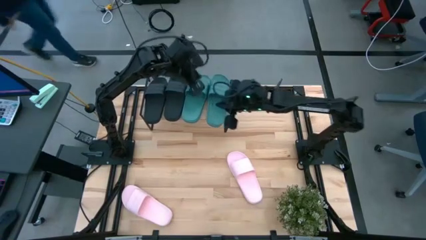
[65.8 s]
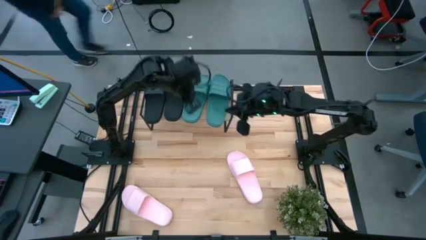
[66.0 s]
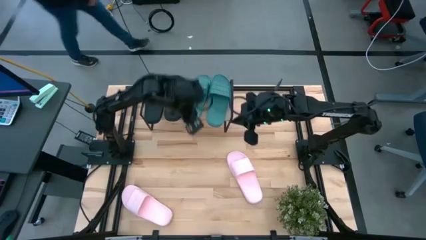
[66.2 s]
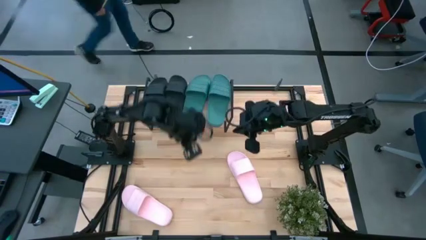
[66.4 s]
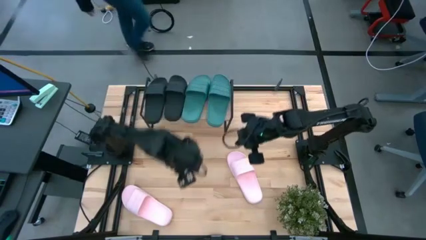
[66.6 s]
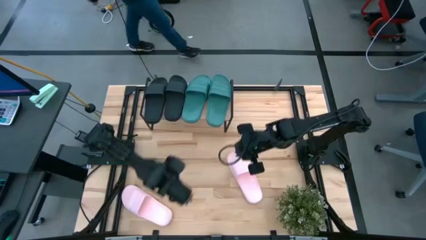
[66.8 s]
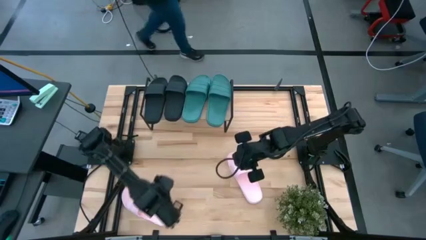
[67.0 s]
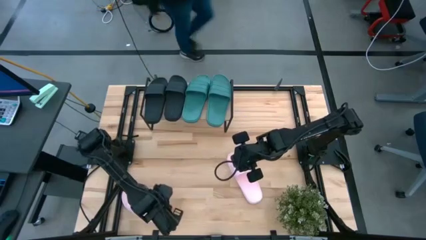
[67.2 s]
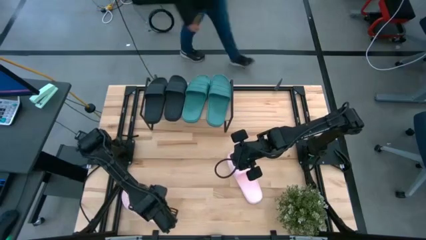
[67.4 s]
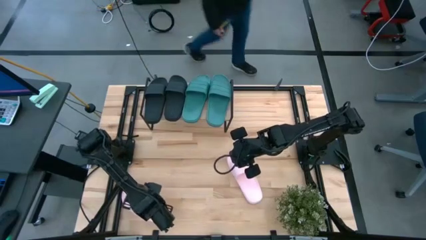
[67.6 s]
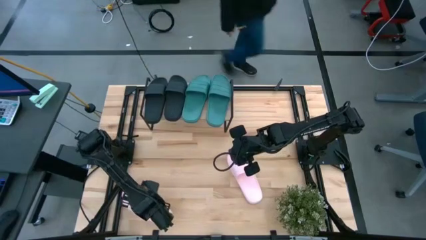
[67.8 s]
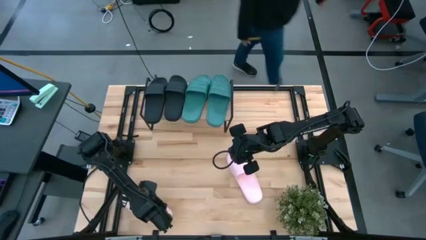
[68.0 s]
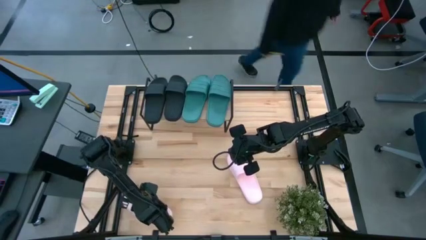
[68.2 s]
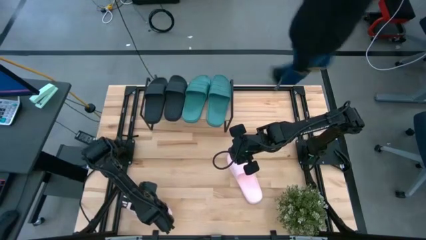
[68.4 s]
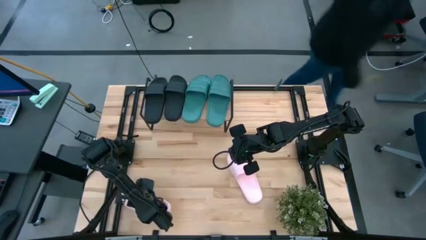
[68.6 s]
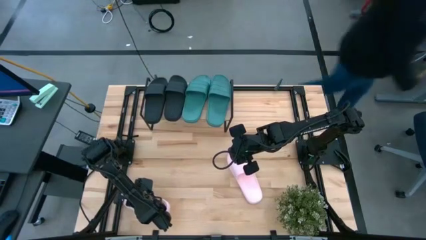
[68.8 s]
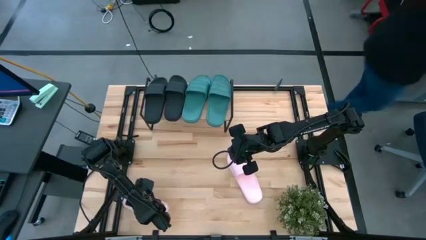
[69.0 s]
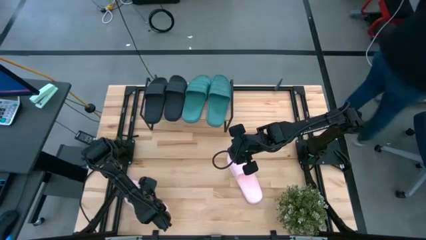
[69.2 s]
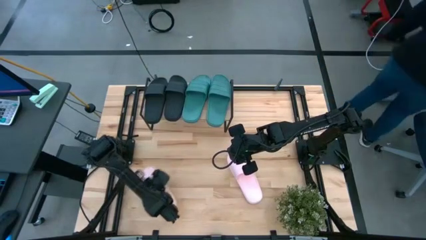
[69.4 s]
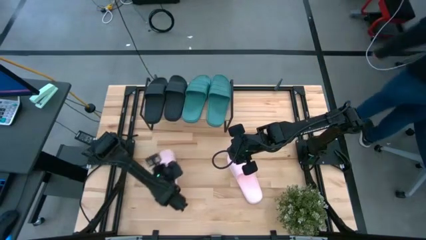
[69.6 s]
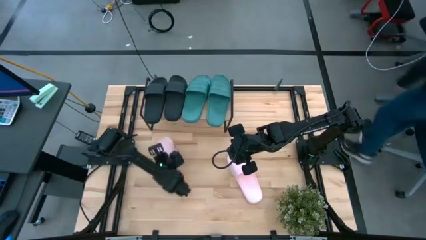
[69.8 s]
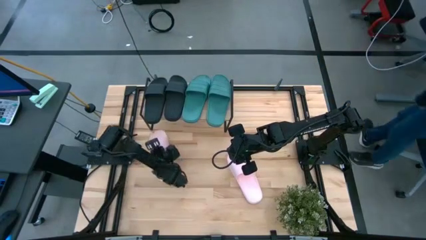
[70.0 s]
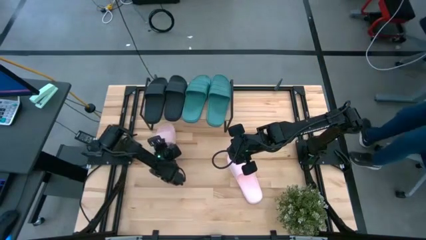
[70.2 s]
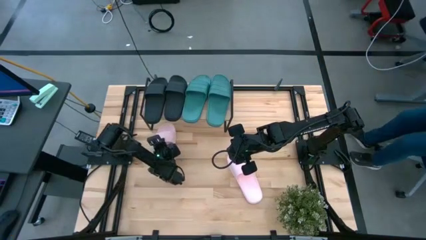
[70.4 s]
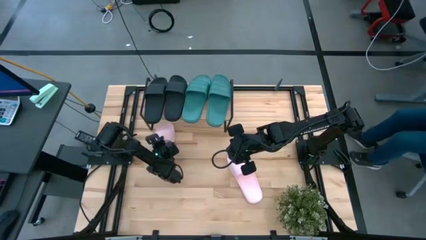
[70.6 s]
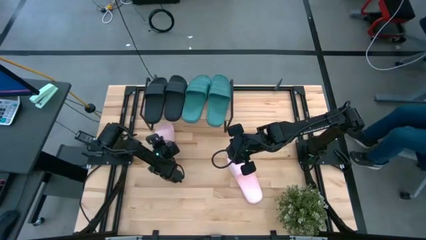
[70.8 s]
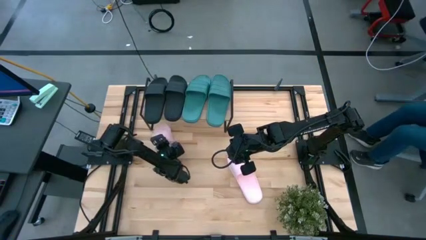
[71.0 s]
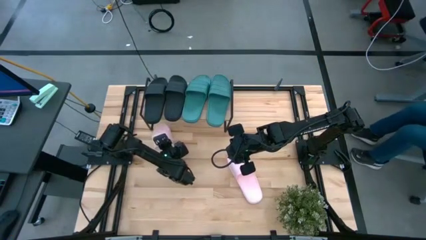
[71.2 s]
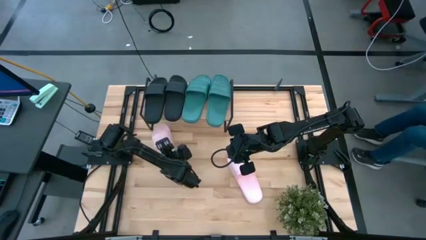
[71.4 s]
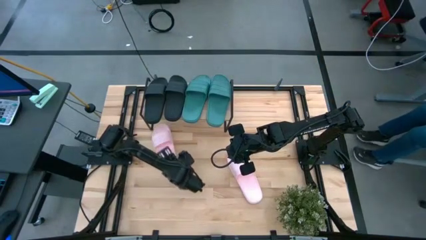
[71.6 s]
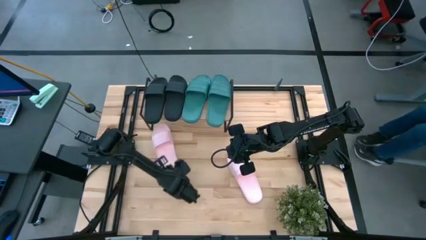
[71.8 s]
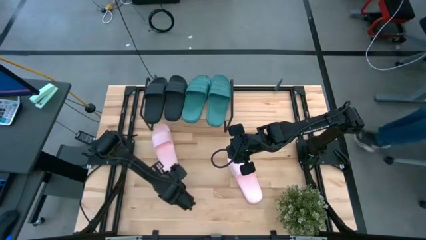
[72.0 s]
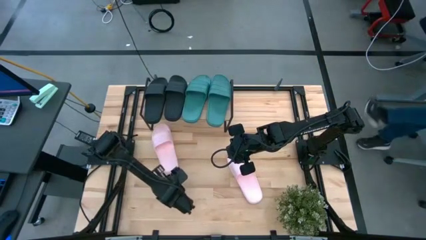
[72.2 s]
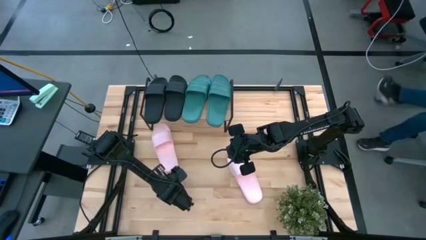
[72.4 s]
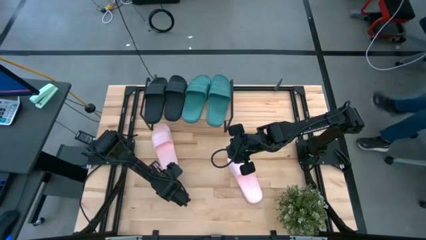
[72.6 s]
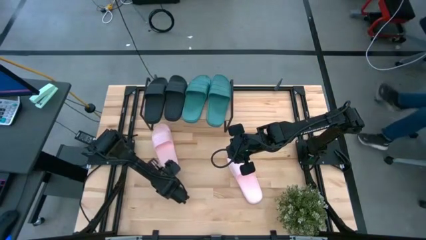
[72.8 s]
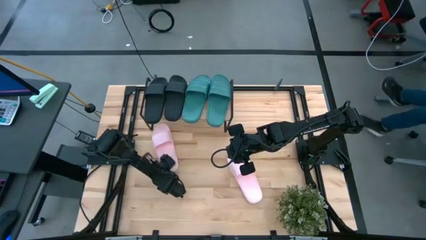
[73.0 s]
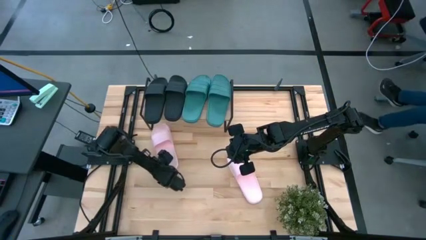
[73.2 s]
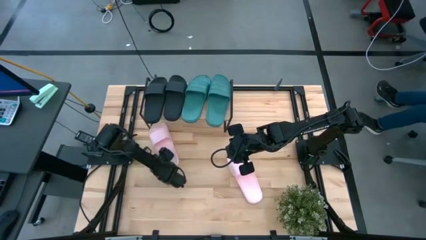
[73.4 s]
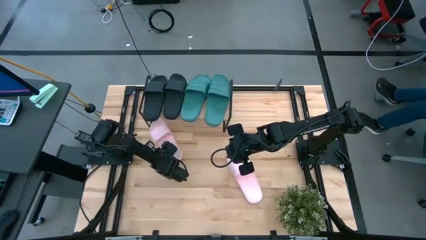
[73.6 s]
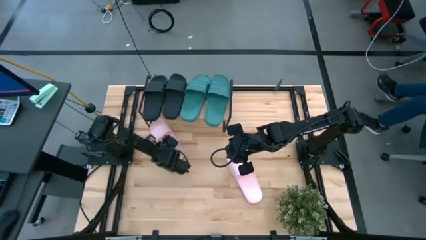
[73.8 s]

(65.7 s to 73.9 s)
Task: Pick and place slides into the shelf
Move the left pink slipper under the shelf

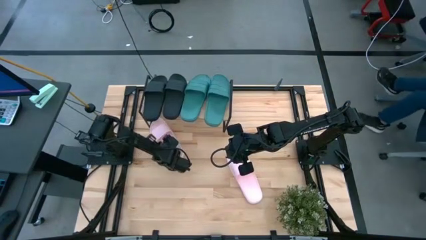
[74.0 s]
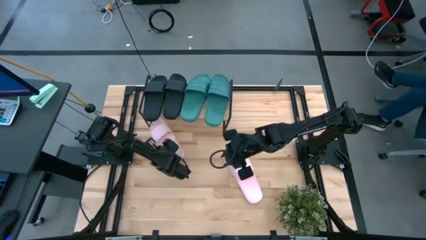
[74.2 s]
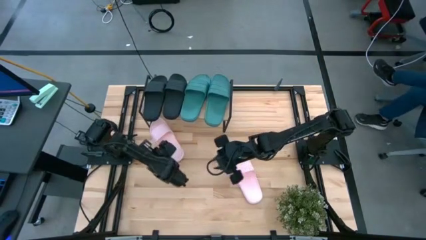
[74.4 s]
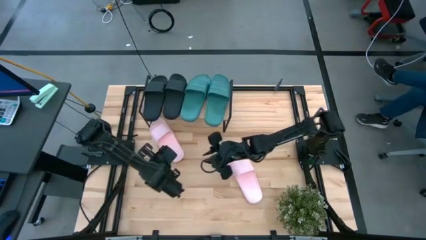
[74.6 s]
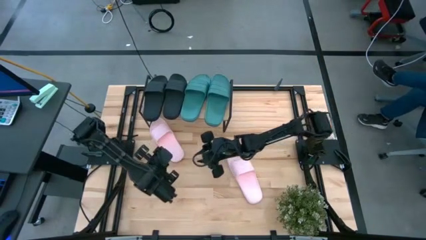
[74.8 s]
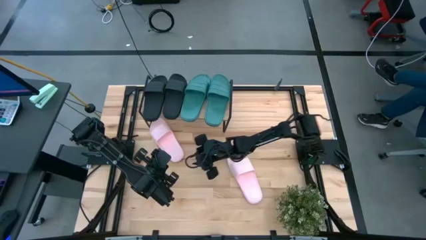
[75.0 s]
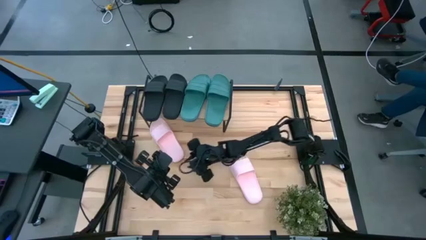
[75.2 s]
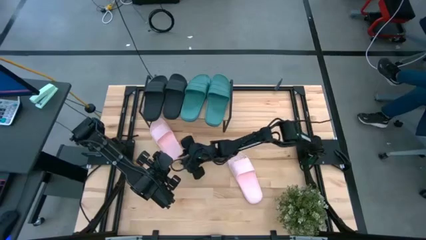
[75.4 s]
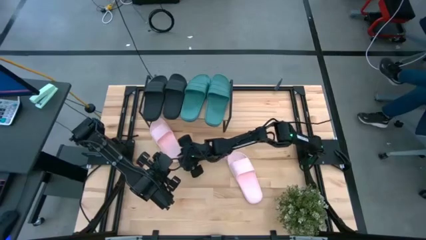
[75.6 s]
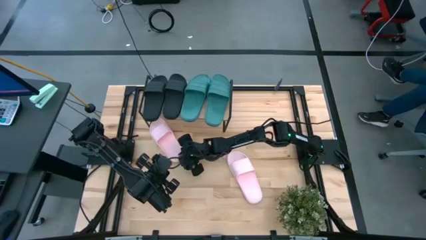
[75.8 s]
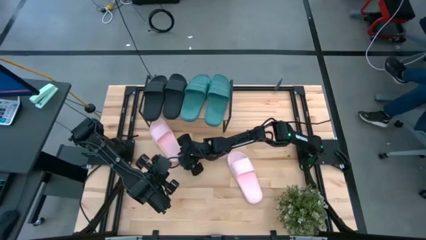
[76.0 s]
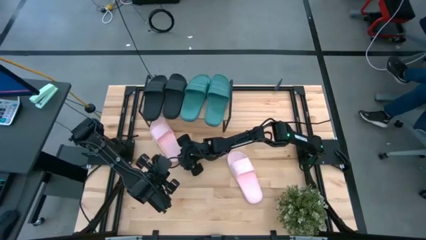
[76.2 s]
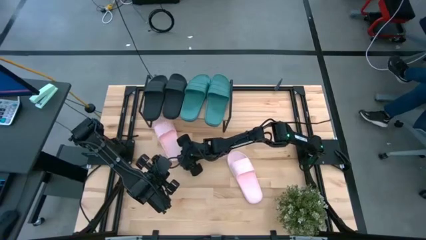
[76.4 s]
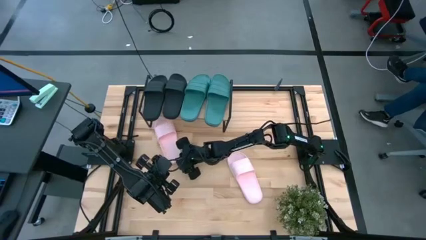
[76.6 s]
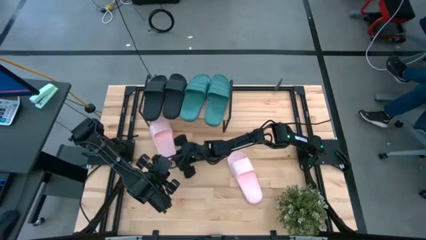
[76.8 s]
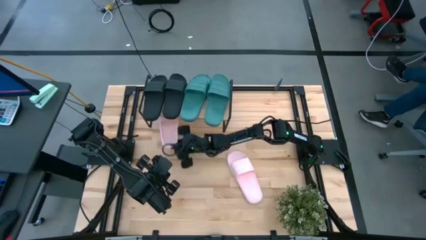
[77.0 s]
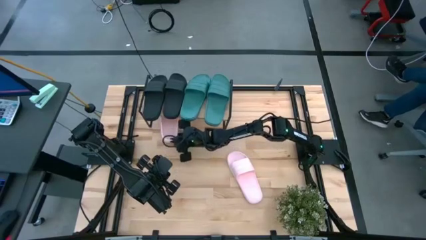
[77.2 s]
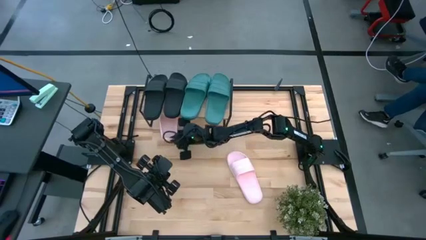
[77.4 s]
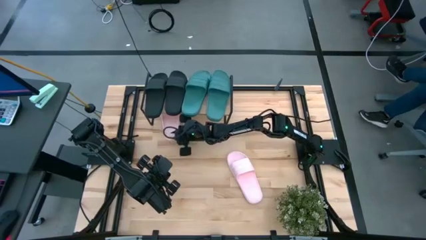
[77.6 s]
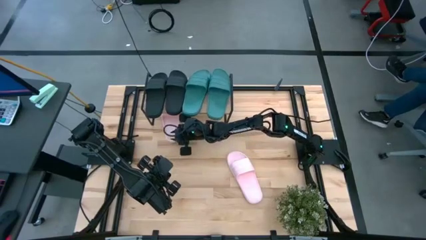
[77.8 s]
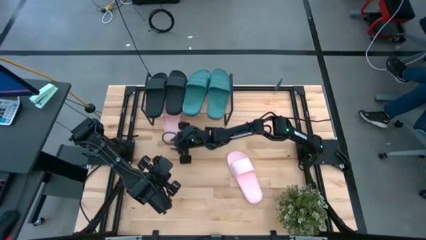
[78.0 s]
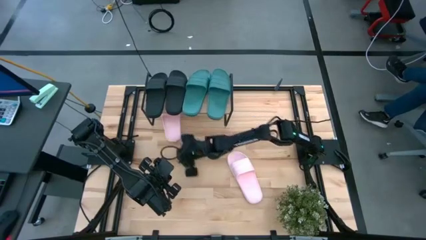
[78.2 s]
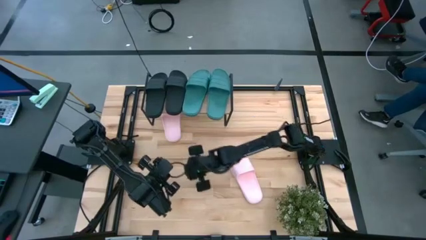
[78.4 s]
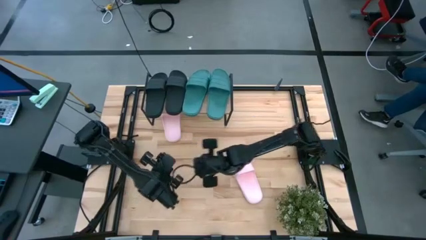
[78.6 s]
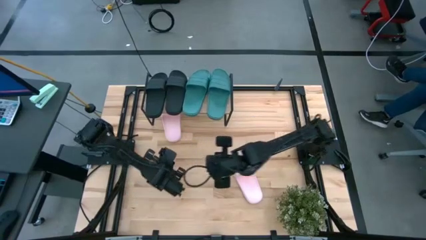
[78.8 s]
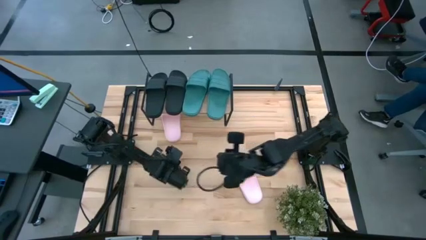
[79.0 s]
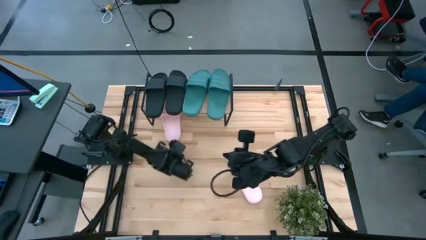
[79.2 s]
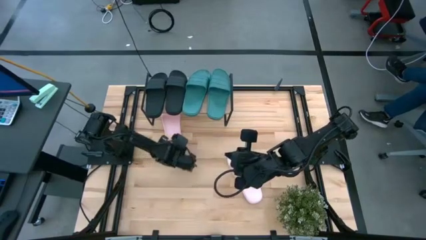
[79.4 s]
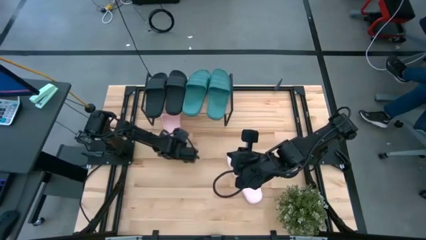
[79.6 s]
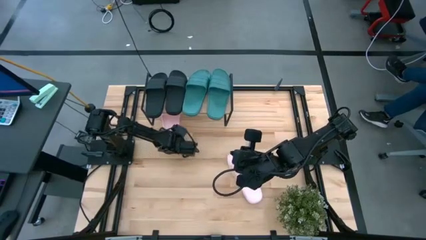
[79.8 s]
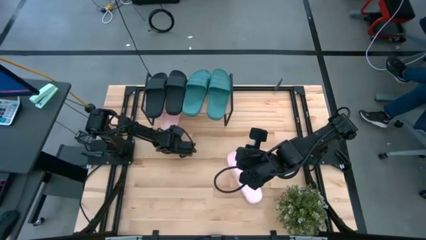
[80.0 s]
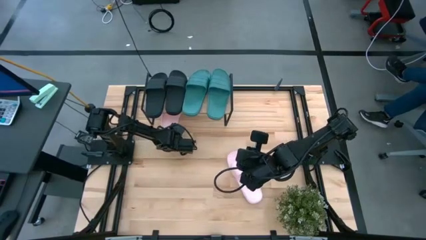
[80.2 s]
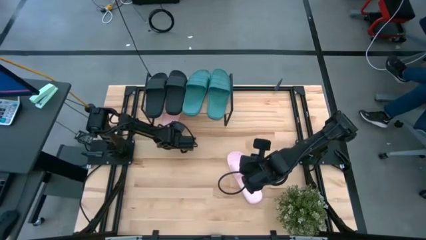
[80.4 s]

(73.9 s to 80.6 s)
Move the left pink slipper under the shelf

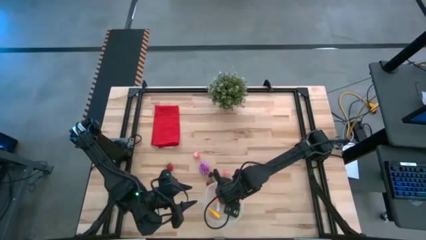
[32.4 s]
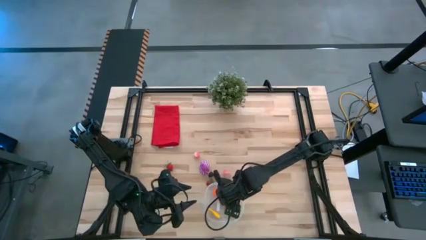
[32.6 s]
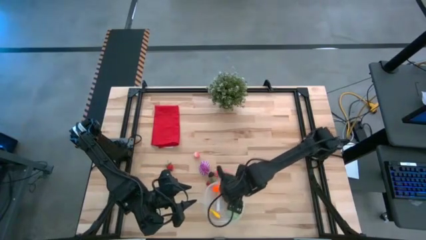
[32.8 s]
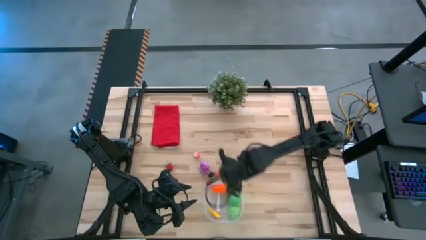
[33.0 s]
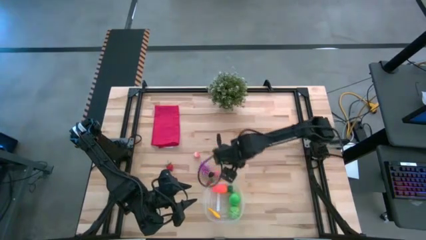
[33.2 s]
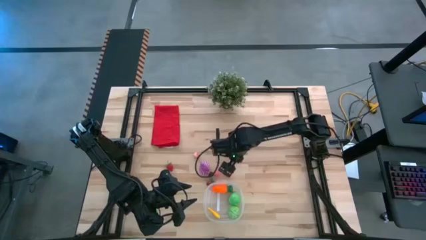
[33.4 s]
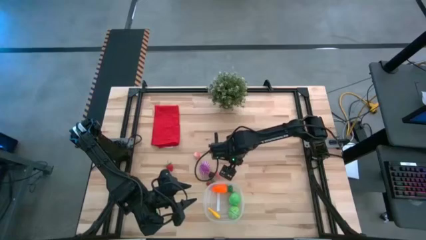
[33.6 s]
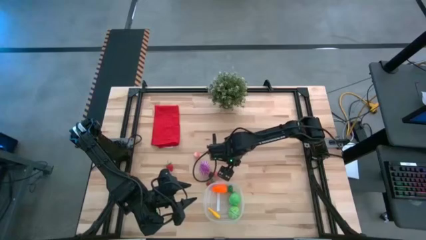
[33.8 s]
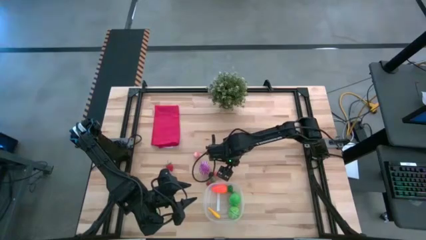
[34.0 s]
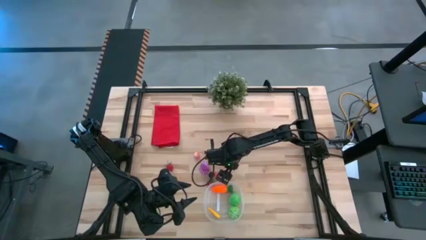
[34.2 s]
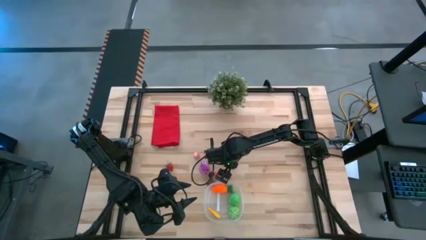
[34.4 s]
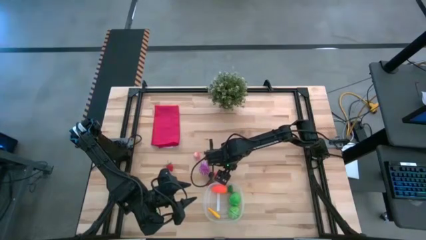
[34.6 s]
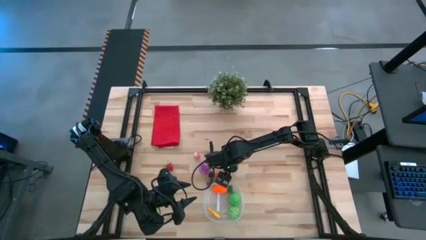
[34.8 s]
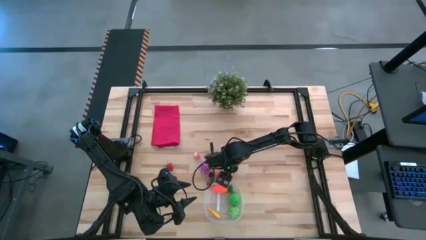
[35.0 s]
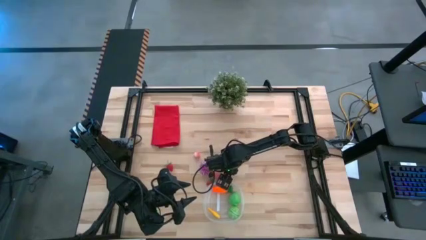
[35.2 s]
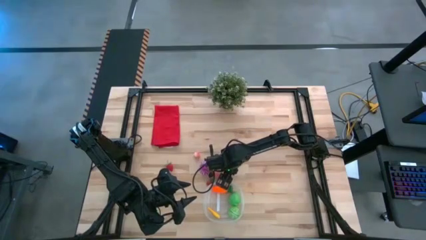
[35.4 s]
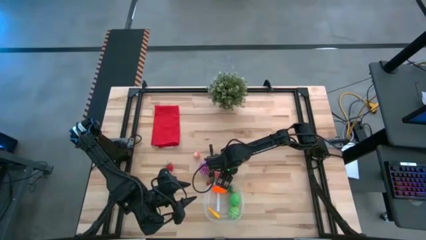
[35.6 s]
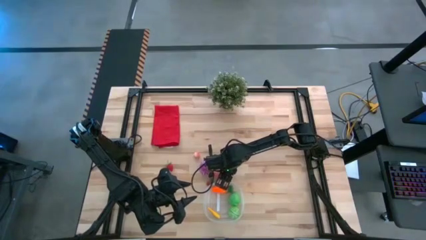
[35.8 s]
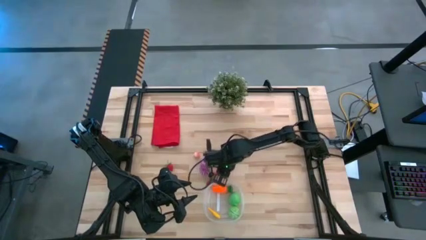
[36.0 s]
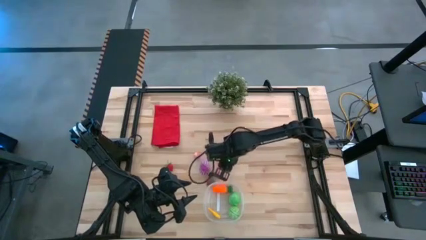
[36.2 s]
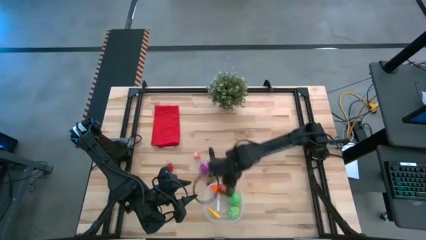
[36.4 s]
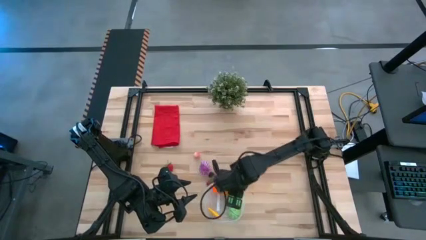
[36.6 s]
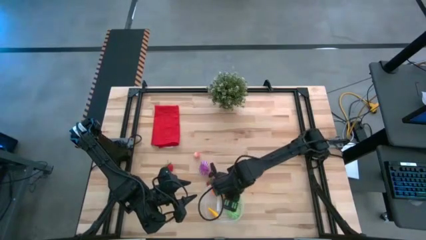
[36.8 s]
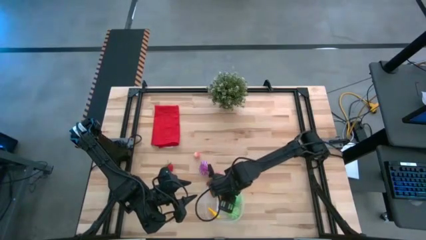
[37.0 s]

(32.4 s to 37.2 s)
Task: Pick and placing Produce into tupperware
Put the bottom right pink peach into the transparent bin
